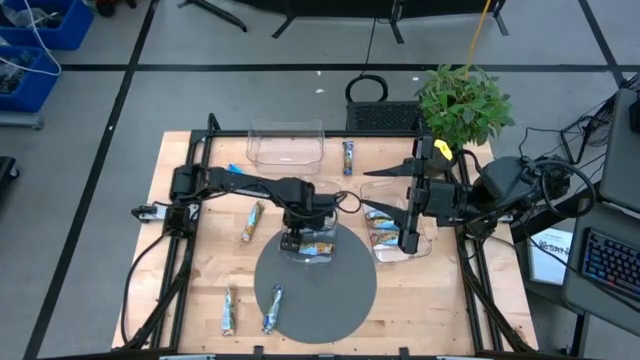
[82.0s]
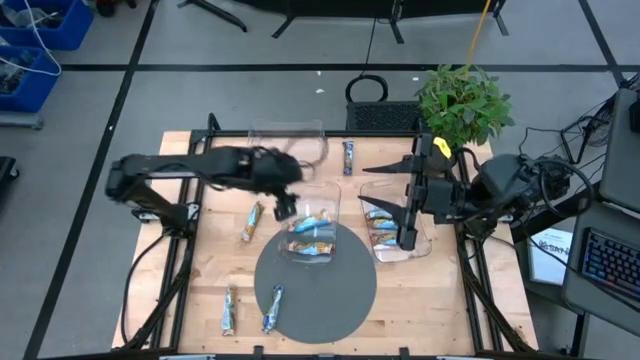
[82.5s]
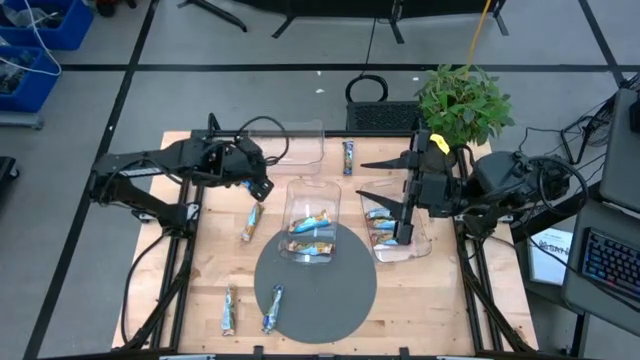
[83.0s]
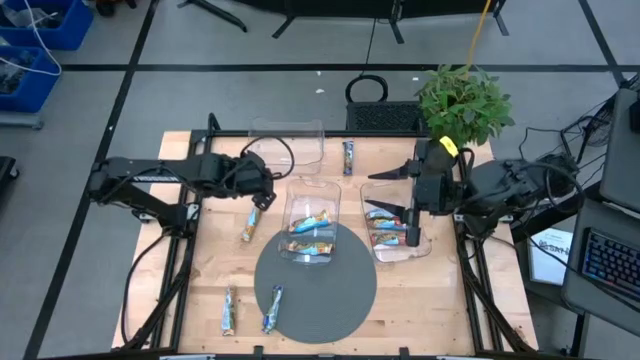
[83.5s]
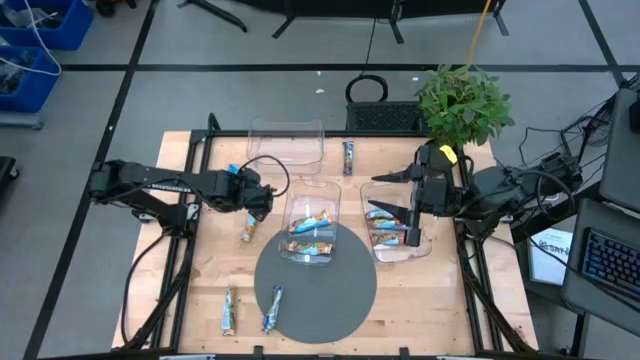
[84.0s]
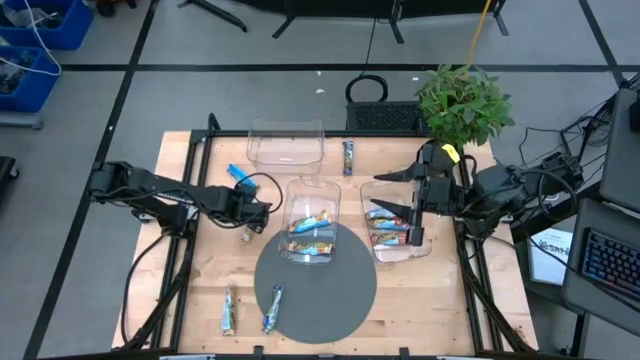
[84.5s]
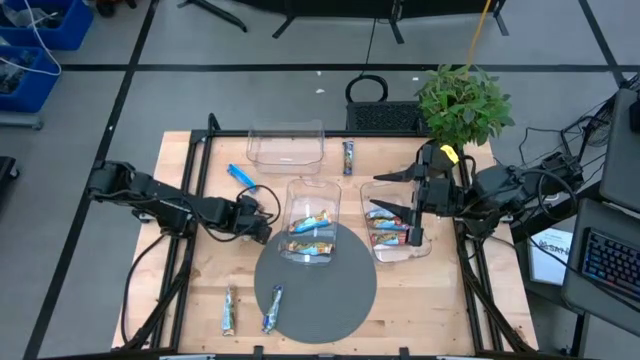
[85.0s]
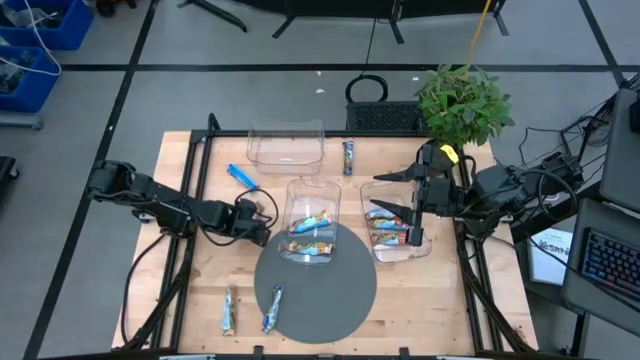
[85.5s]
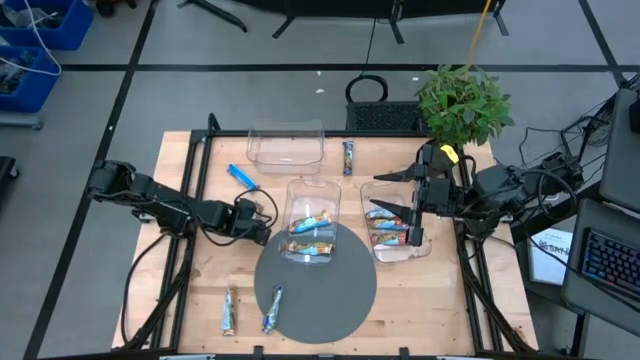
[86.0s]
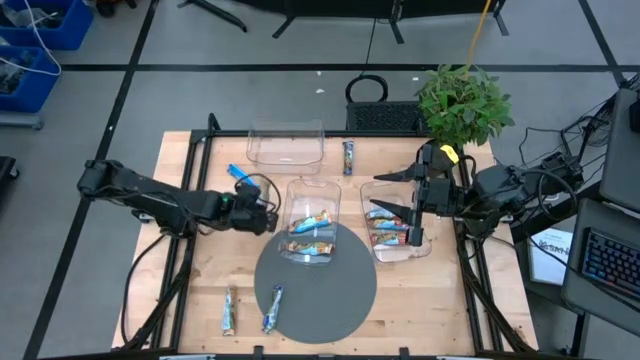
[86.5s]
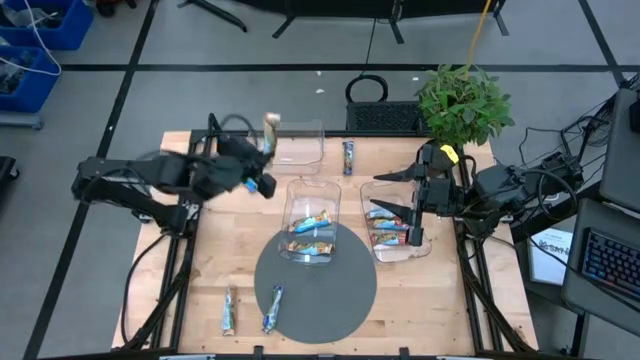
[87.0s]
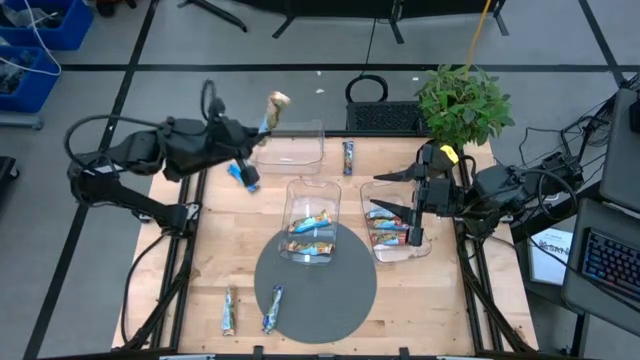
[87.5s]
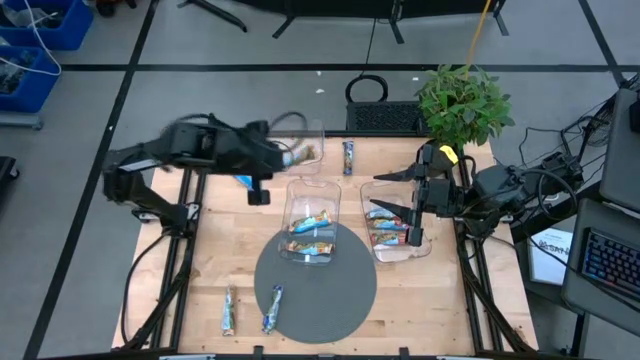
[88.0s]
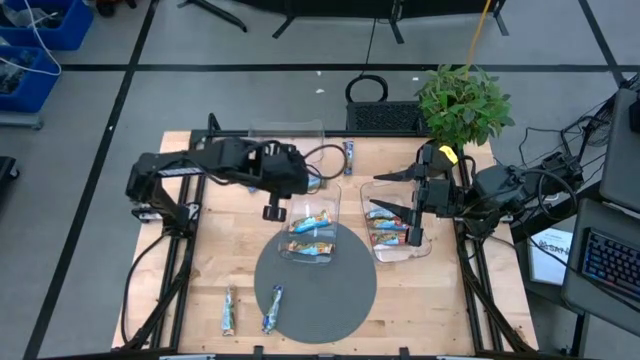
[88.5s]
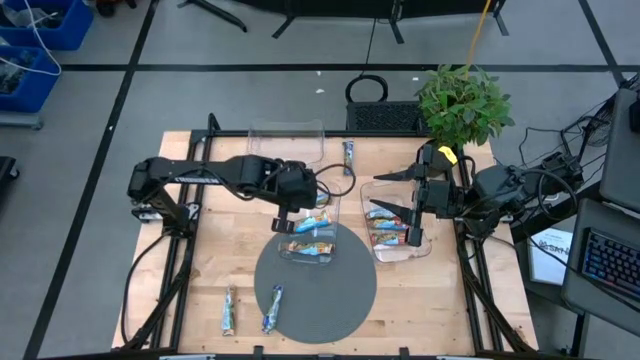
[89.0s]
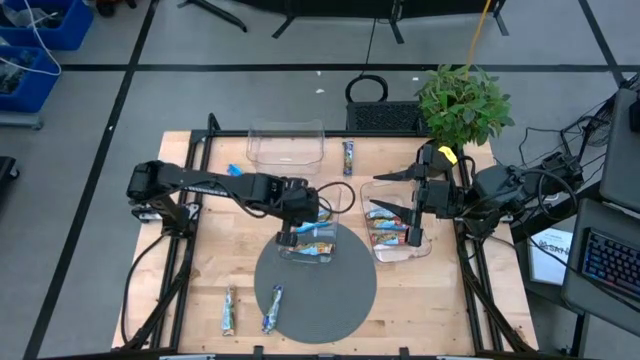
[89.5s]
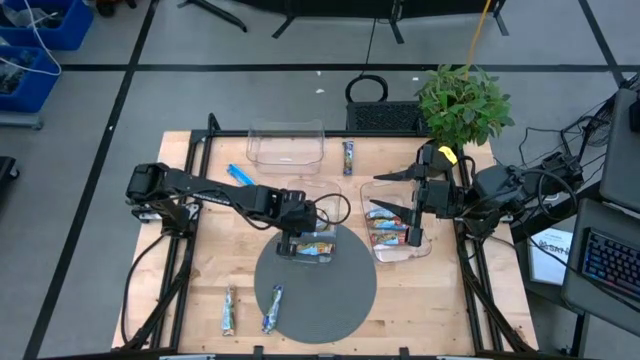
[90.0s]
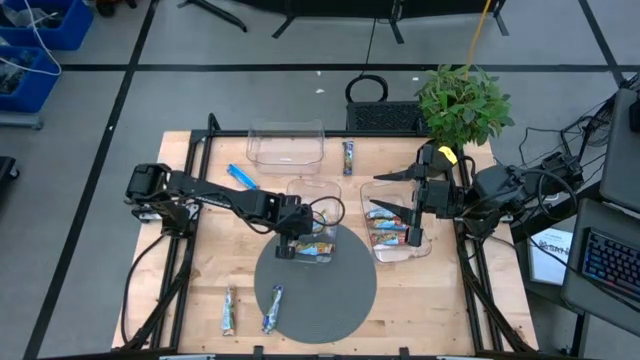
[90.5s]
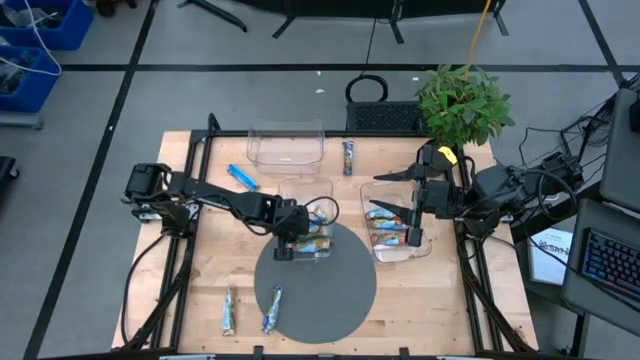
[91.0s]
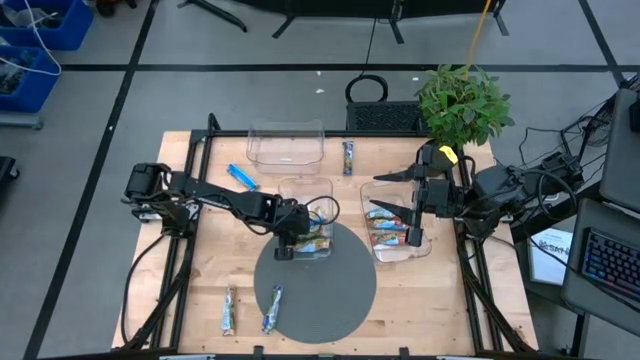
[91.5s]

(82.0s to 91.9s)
Task: Pick and place Granola Bars by type
Put the yellow granola bar into the bottom left transparent bin

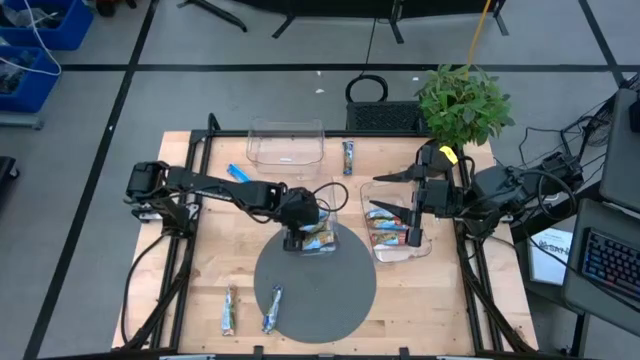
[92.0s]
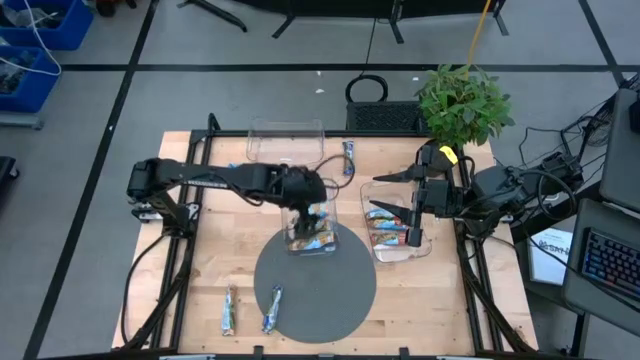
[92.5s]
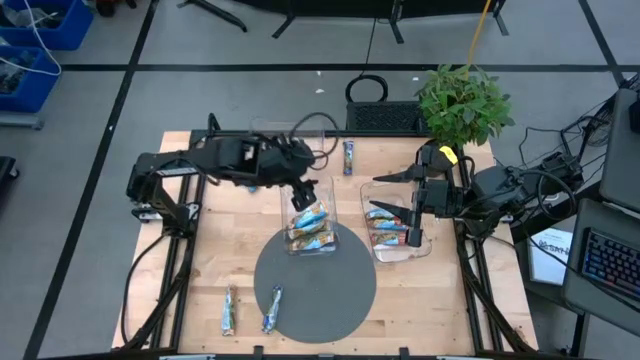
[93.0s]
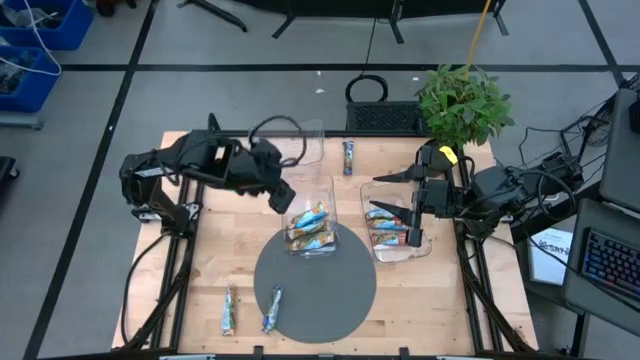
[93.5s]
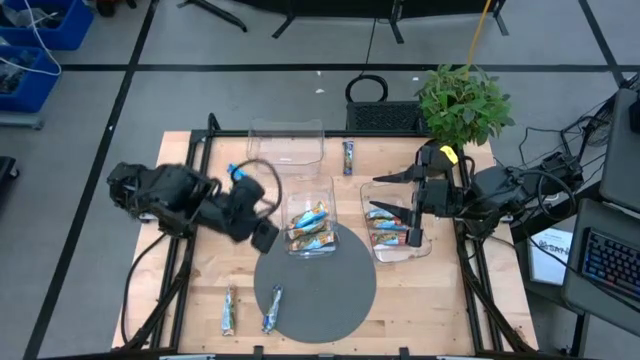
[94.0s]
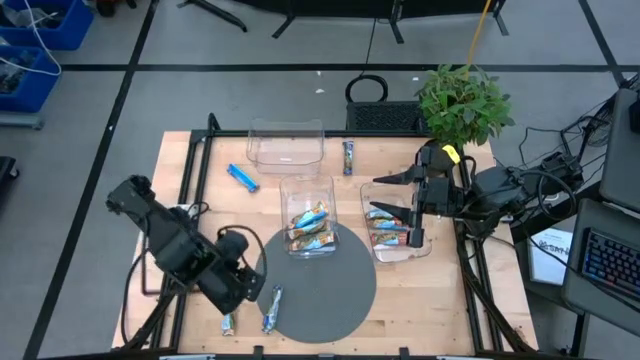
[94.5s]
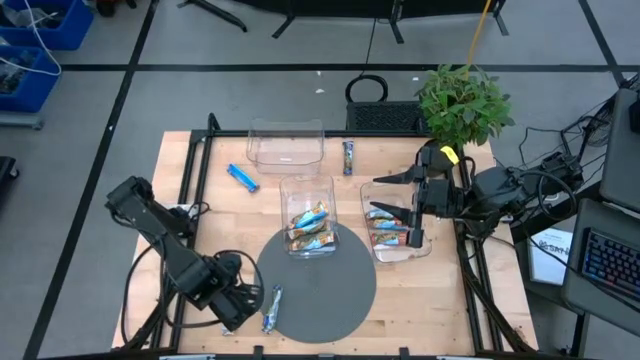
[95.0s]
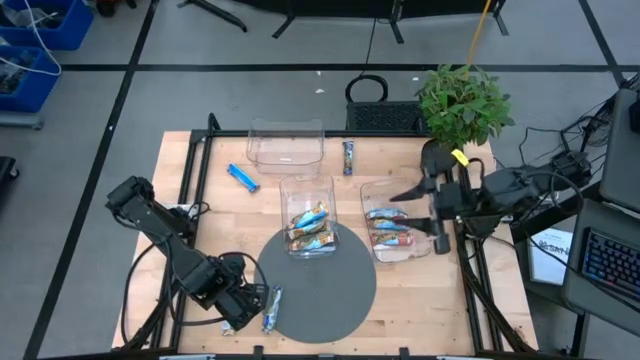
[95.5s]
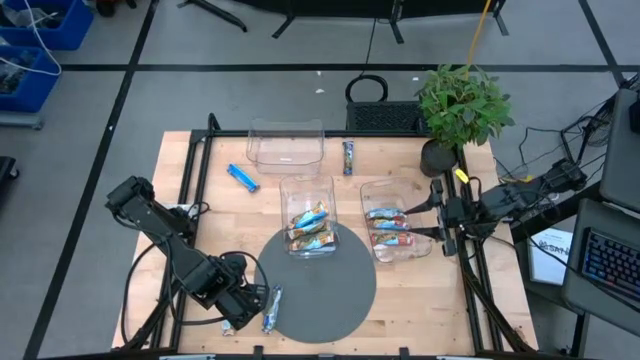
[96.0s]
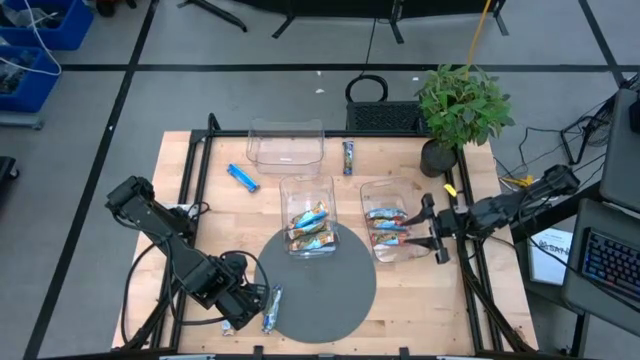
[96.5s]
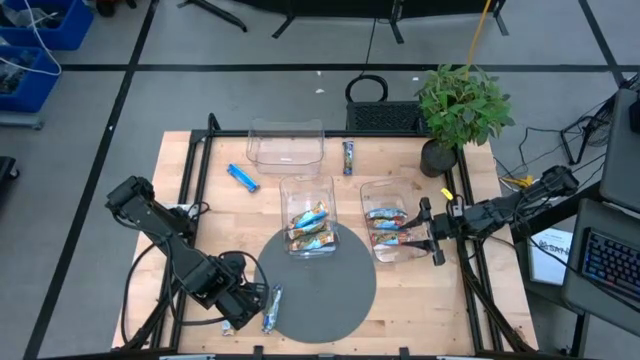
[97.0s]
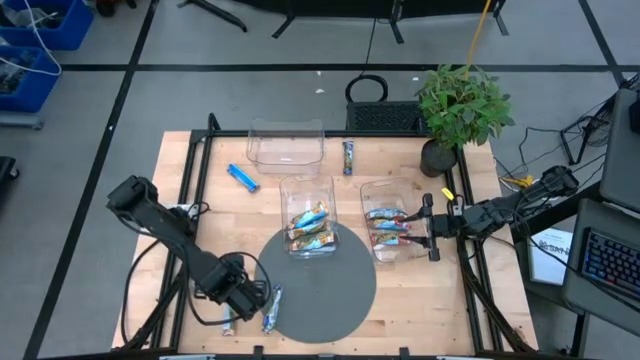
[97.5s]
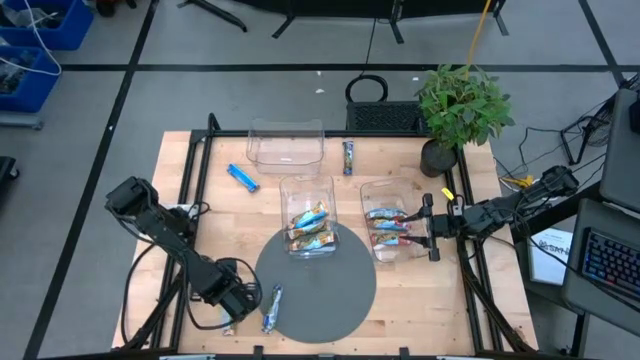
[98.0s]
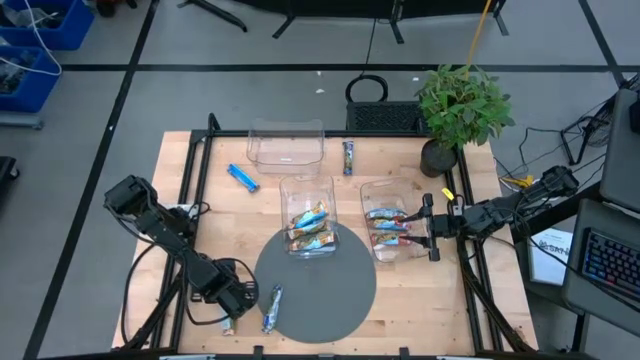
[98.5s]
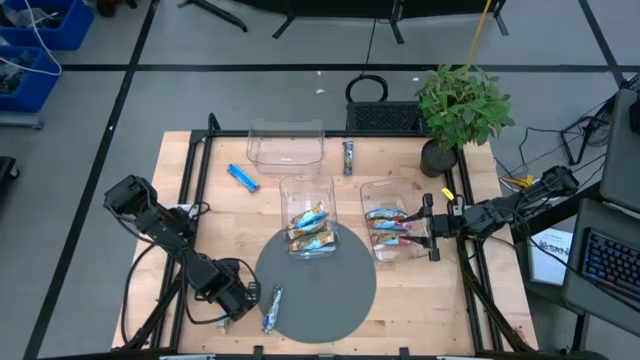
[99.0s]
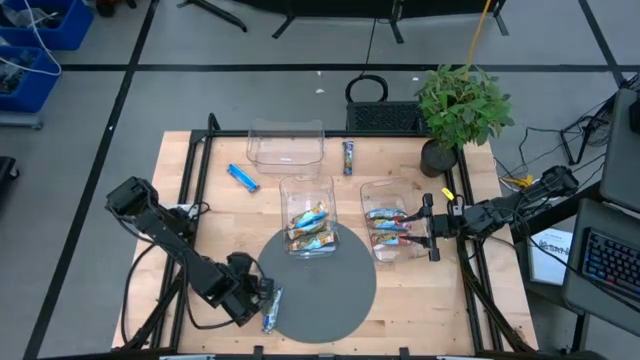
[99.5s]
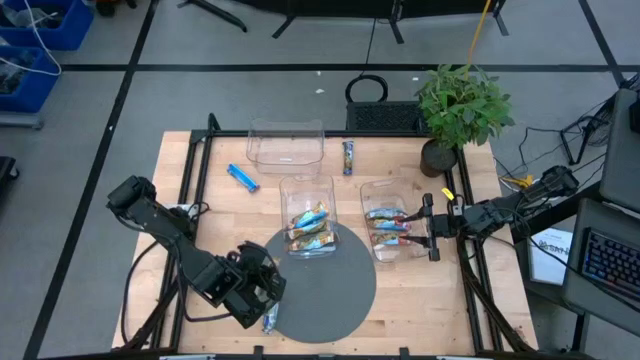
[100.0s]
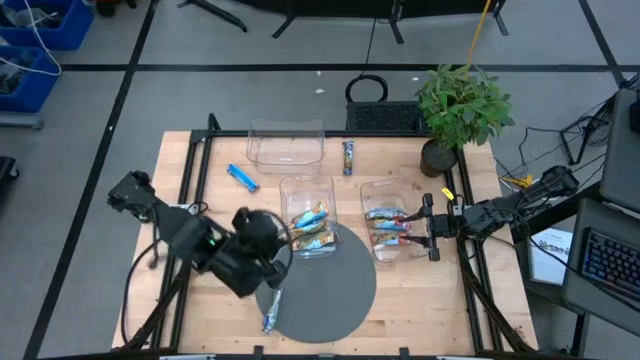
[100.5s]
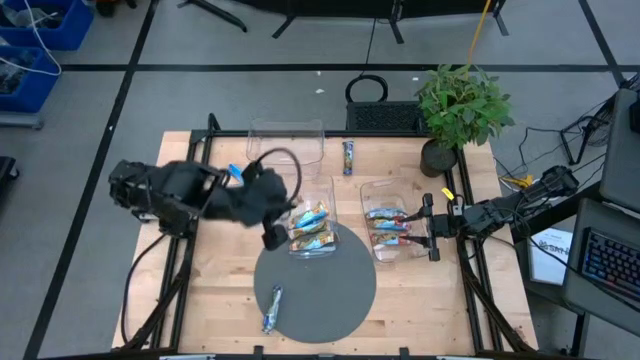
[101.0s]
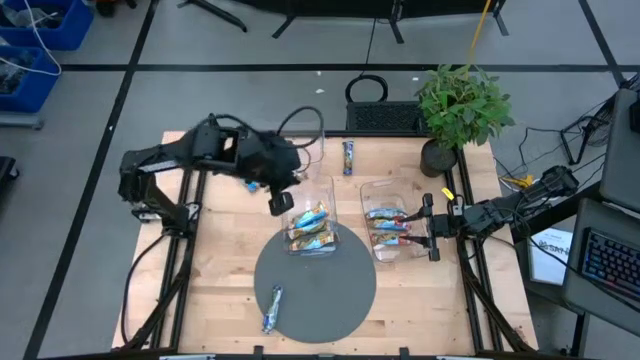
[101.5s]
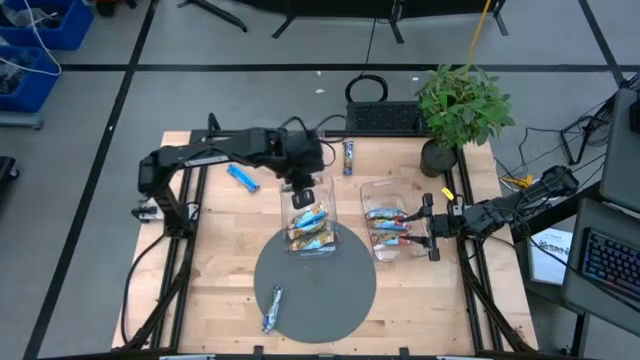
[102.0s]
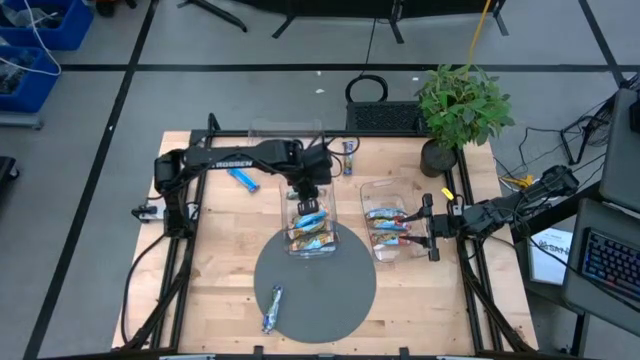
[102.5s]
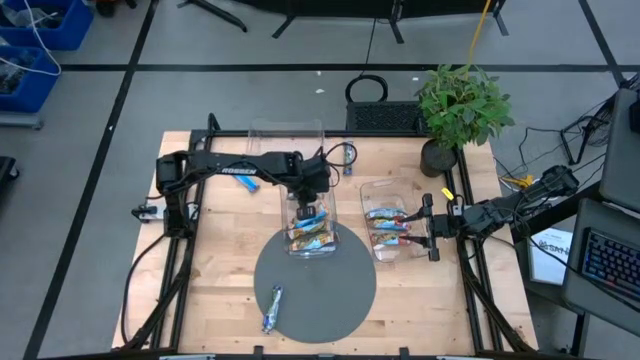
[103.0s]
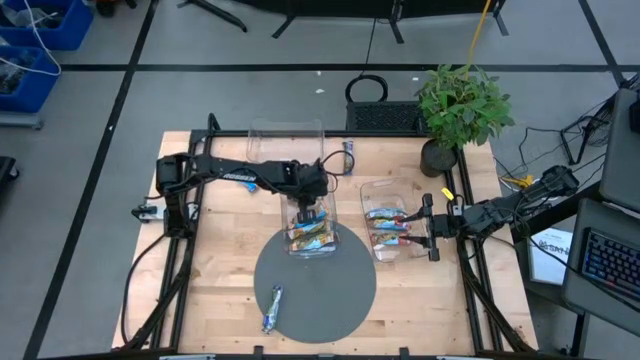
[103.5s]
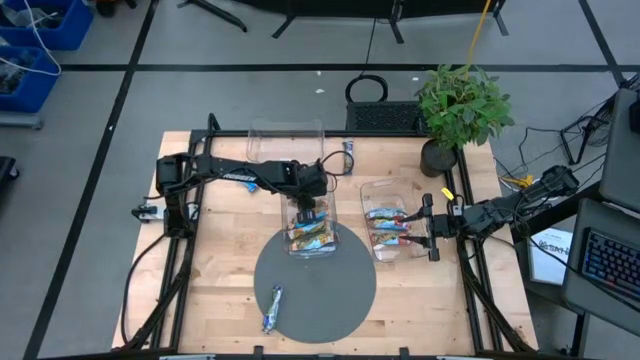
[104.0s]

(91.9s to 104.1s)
Put the yellow granola bar into the bottom left transparent bin
